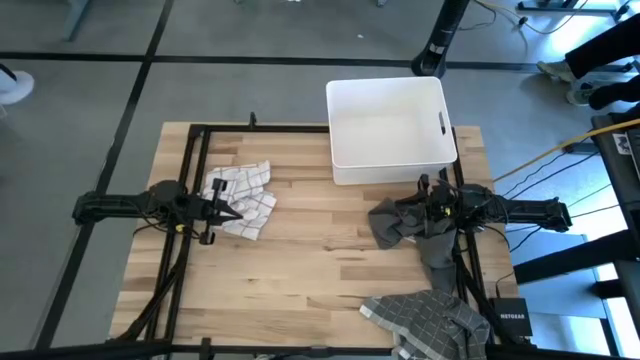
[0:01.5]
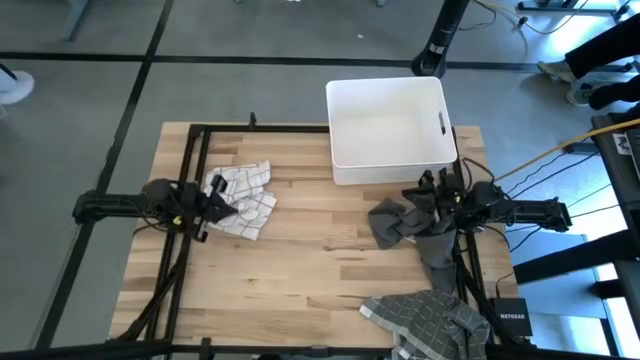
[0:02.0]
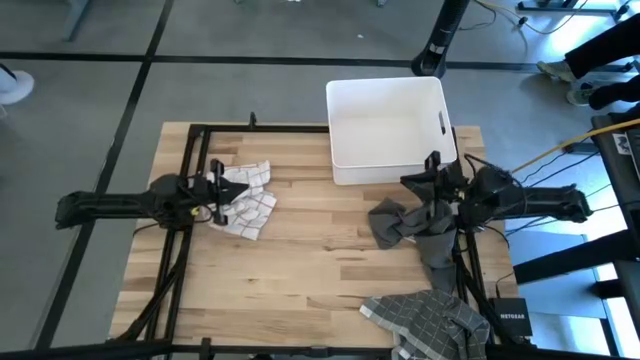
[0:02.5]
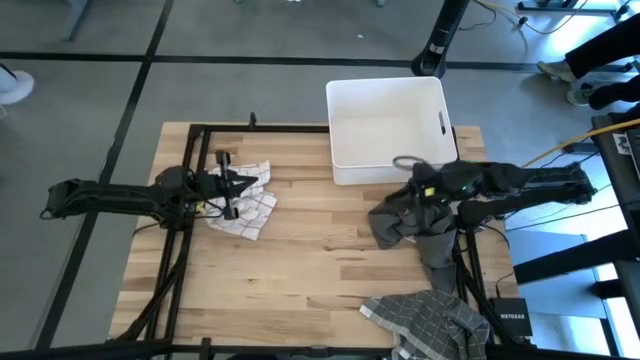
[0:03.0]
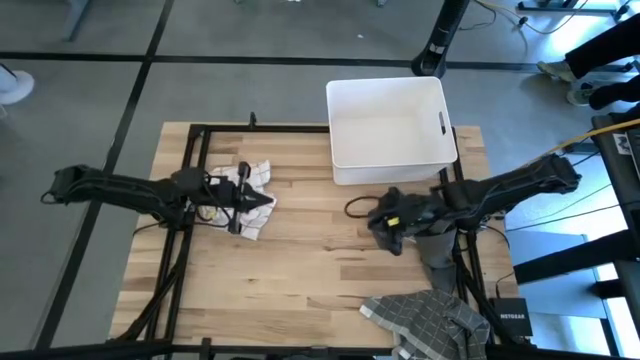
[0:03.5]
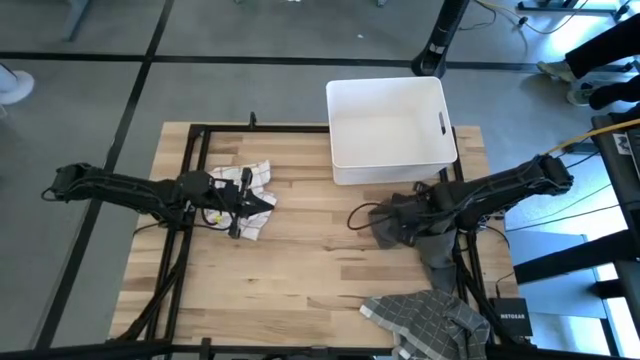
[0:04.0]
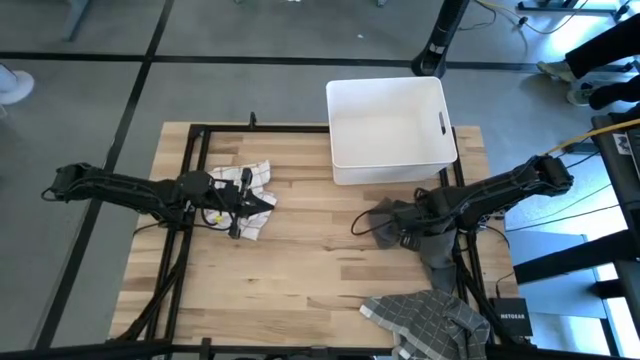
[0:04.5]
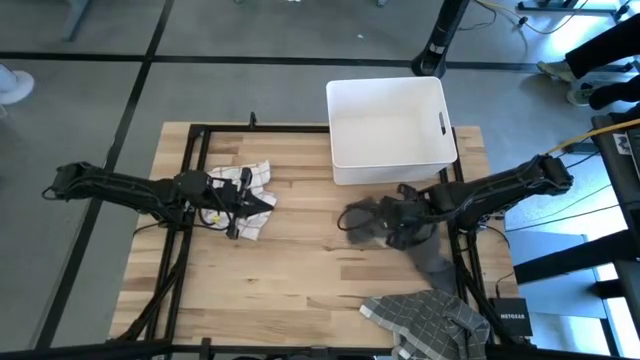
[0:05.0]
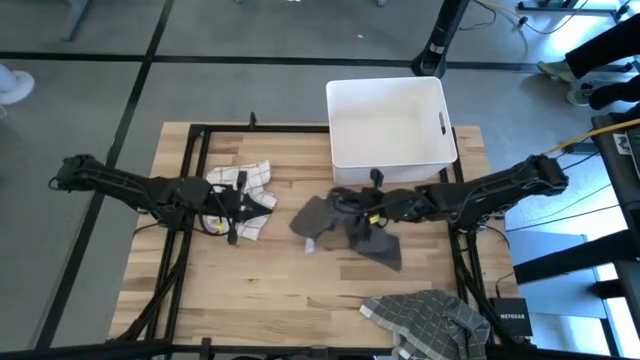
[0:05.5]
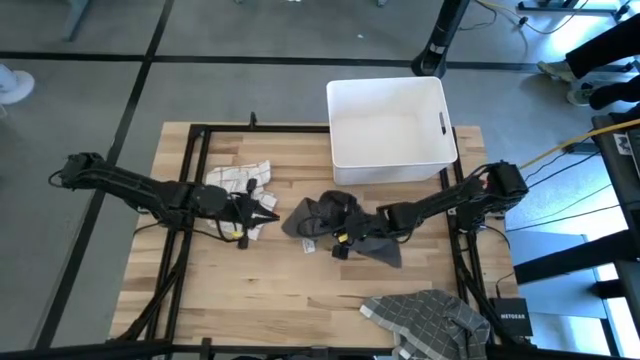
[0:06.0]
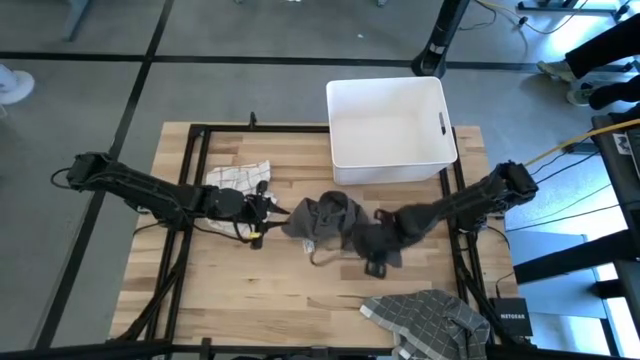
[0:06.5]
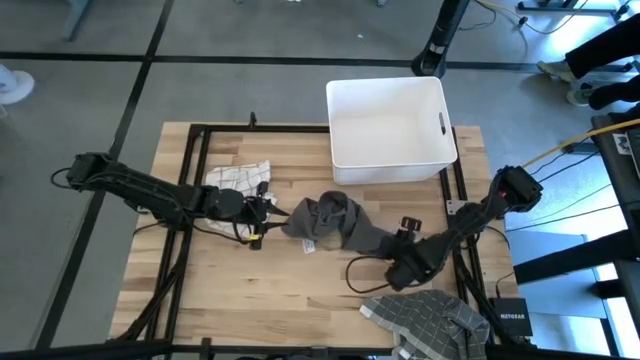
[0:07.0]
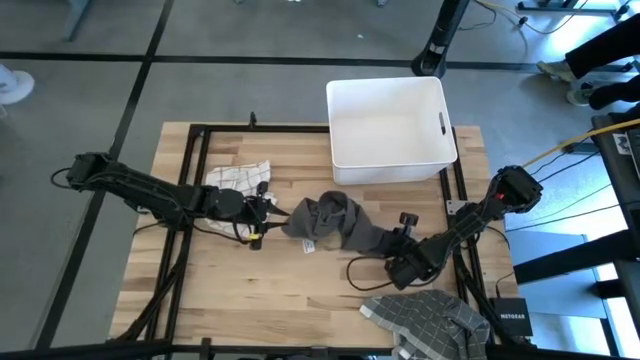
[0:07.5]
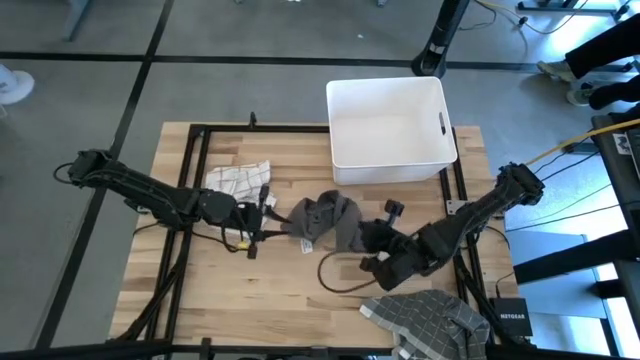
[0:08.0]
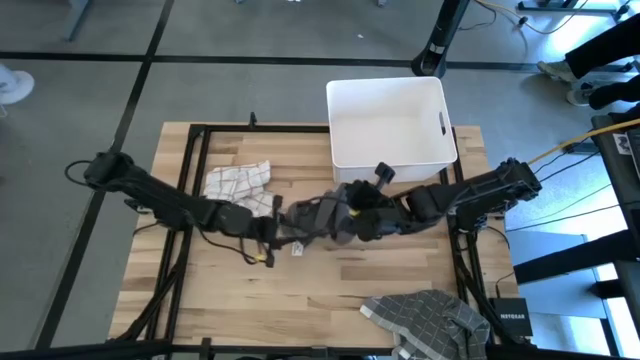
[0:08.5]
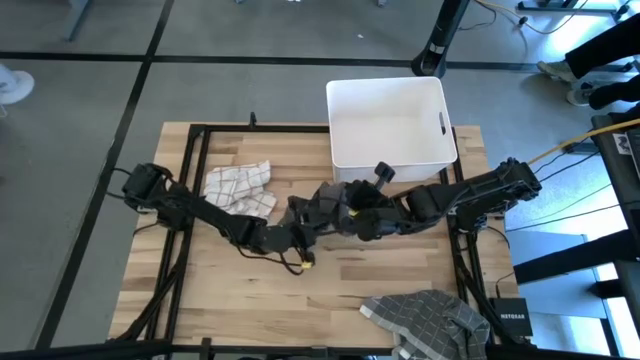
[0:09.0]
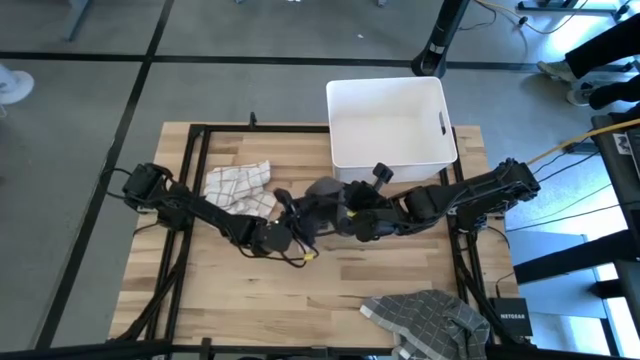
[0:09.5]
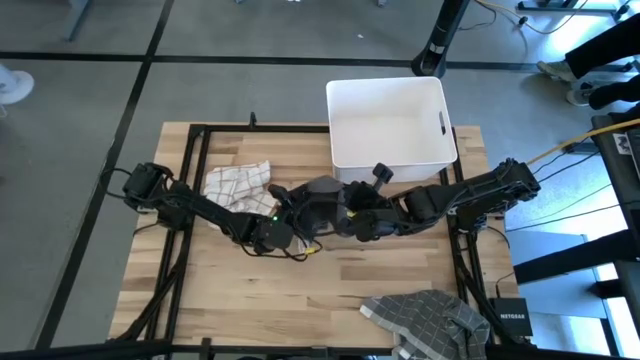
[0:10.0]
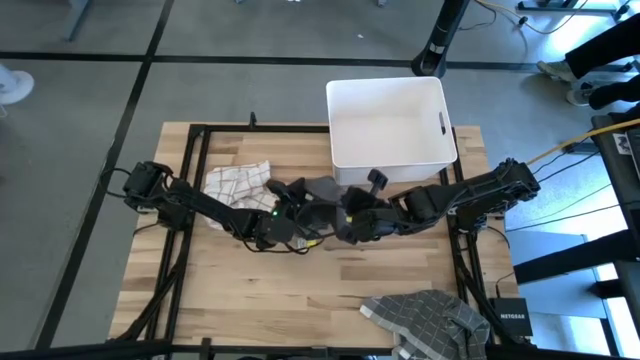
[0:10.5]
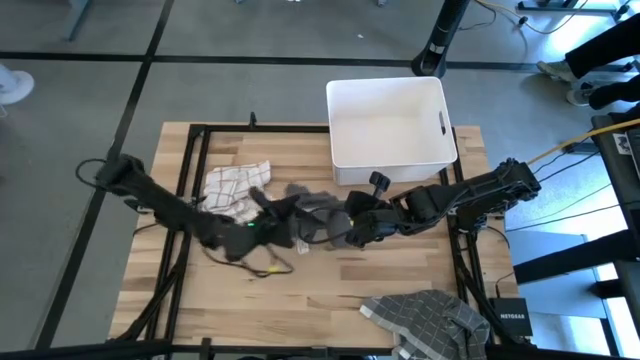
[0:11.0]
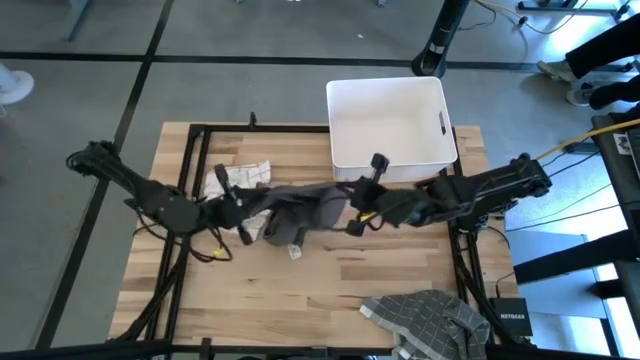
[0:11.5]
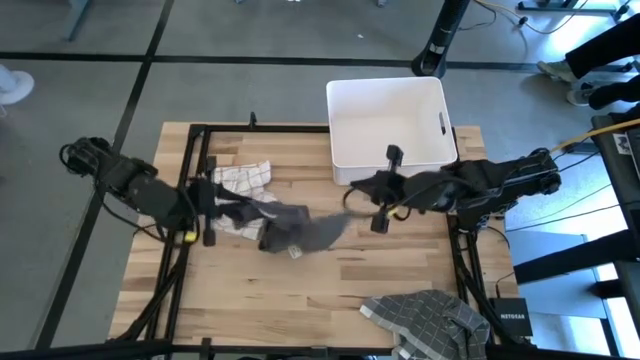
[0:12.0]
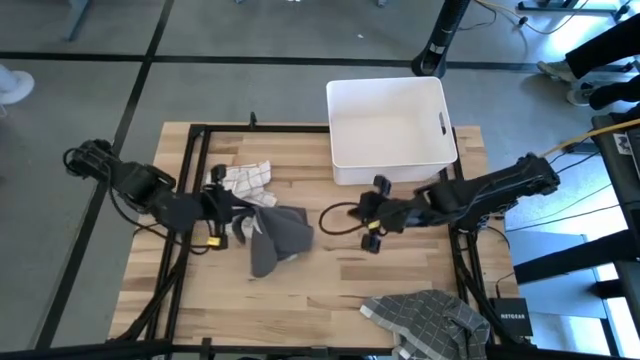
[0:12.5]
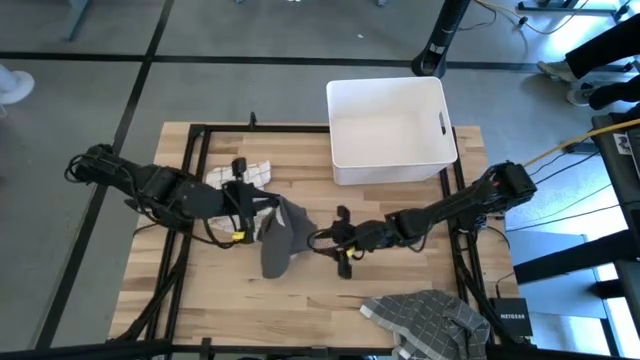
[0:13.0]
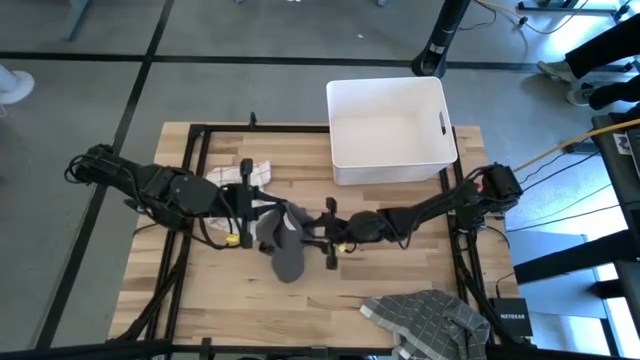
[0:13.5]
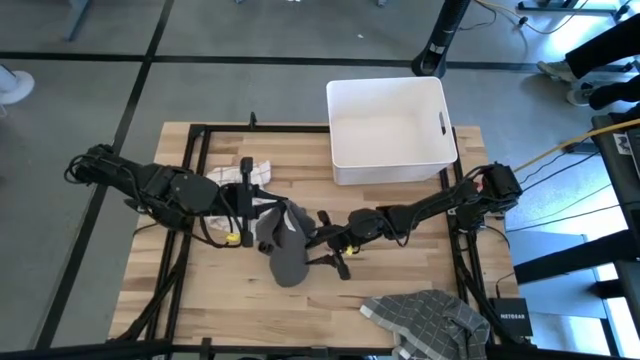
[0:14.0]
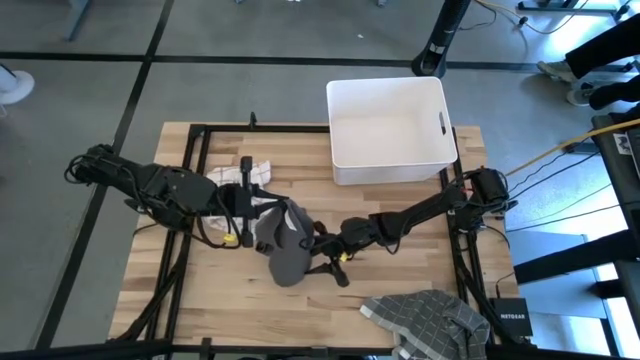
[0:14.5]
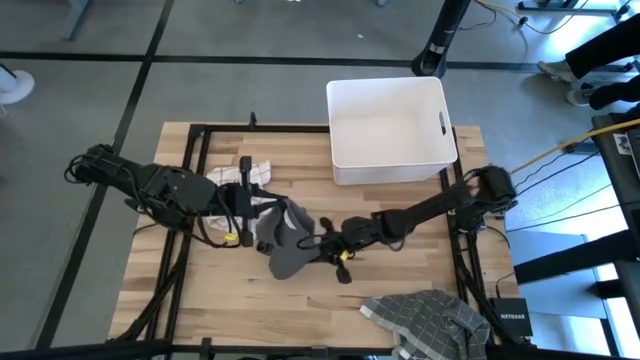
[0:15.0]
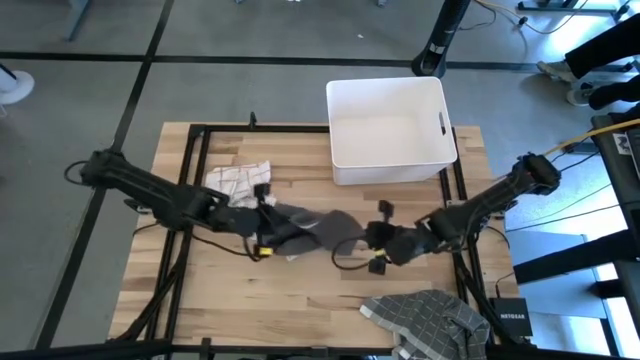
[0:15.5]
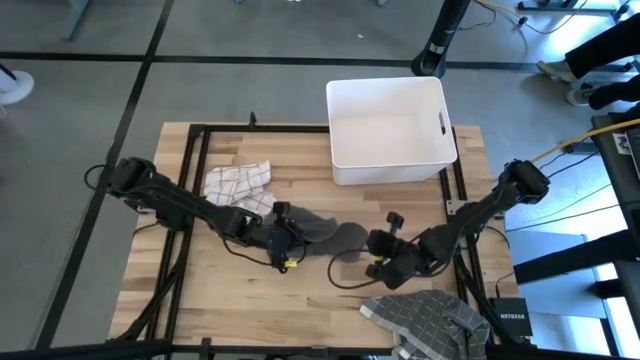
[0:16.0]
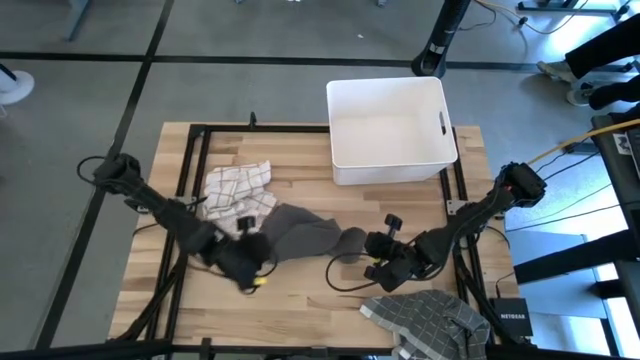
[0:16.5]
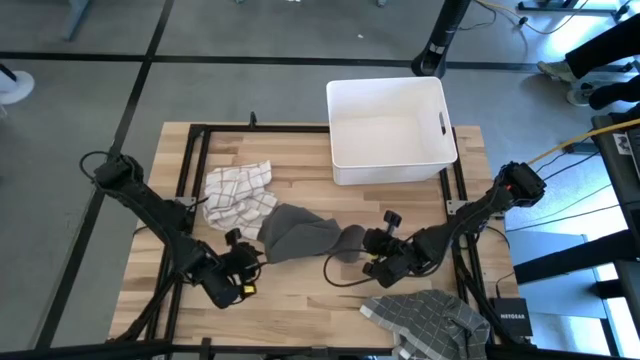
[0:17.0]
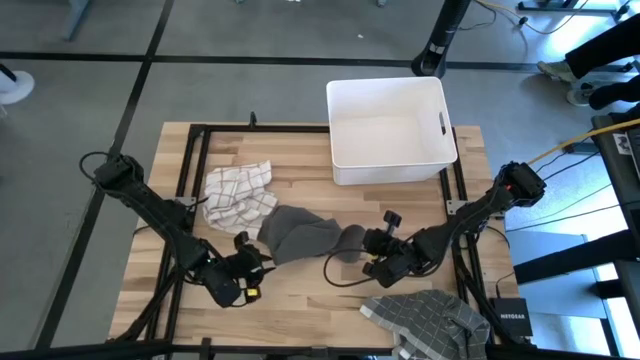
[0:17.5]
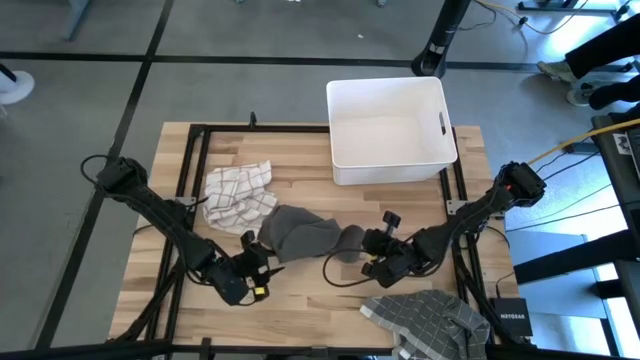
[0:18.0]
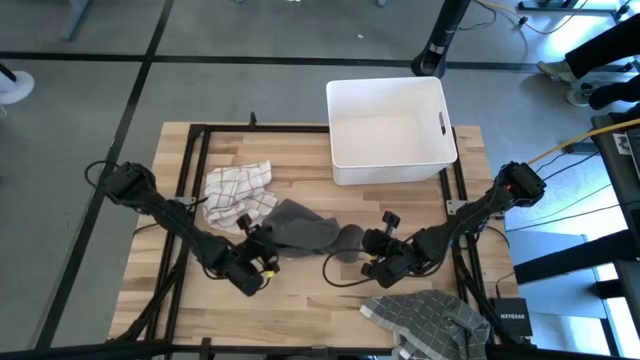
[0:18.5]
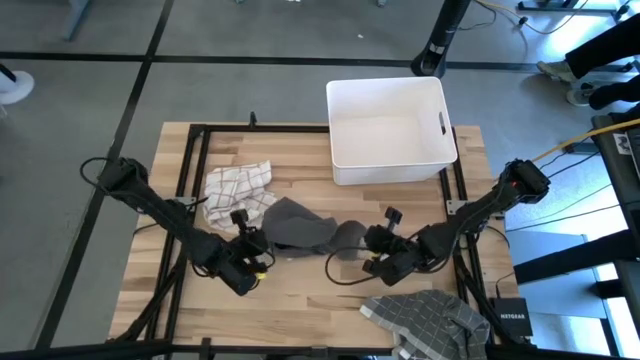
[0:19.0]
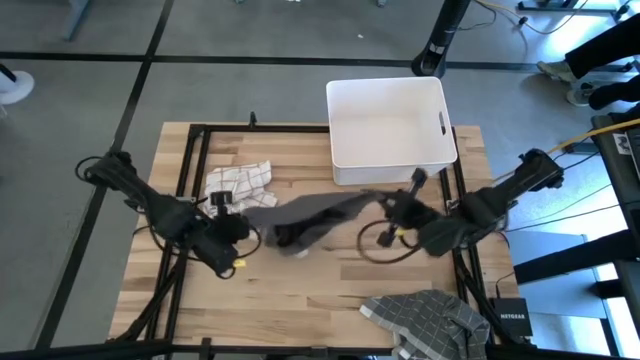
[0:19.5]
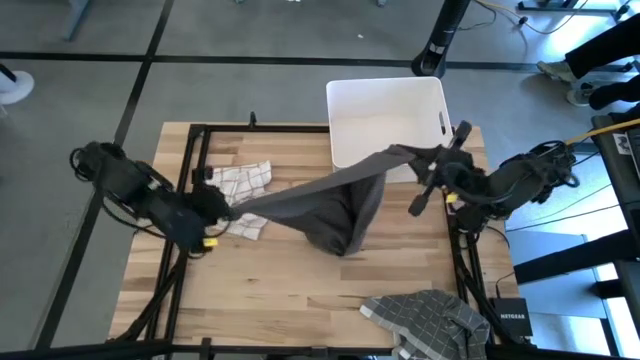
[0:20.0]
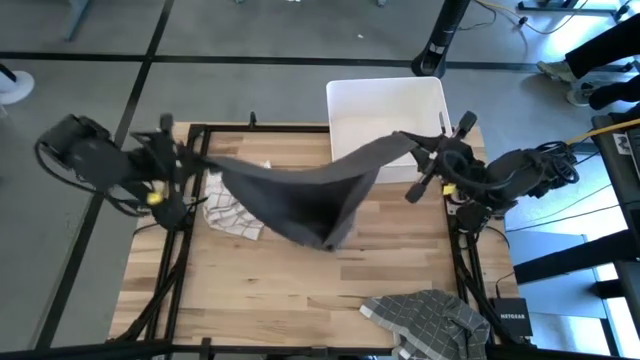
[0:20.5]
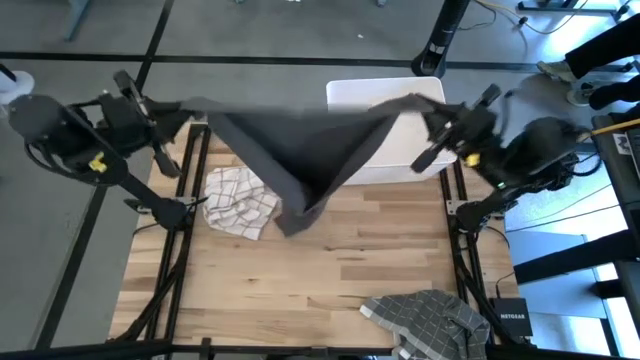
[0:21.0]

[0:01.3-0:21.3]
Task: Fold towel
Fold the gray towel
